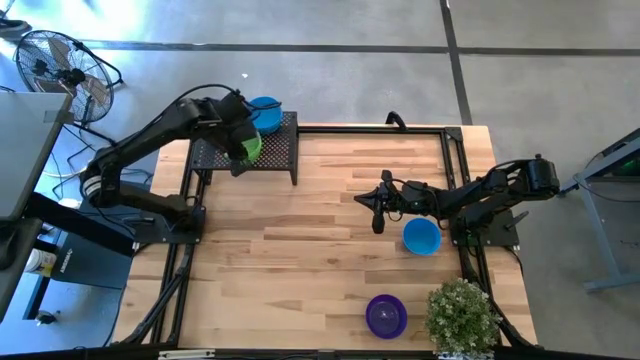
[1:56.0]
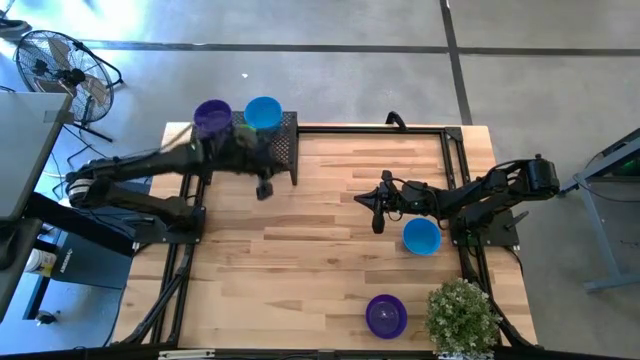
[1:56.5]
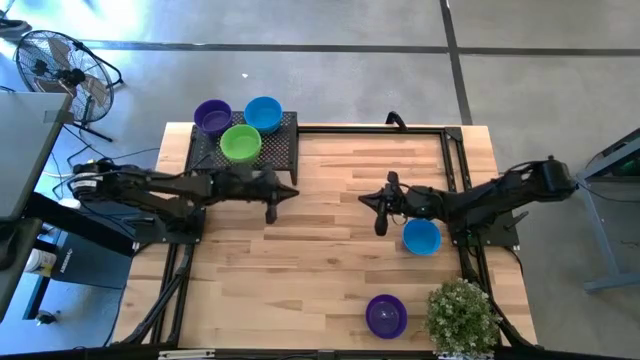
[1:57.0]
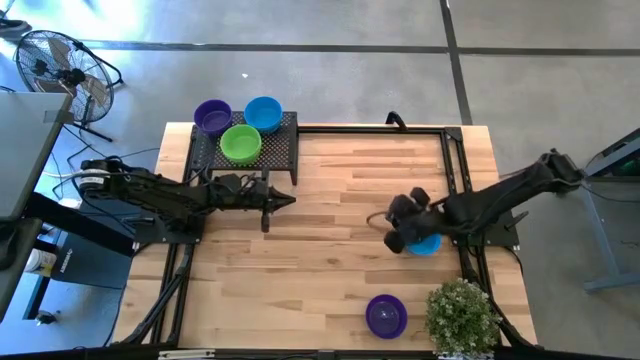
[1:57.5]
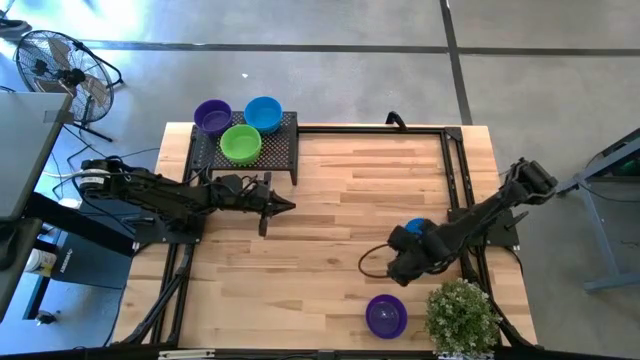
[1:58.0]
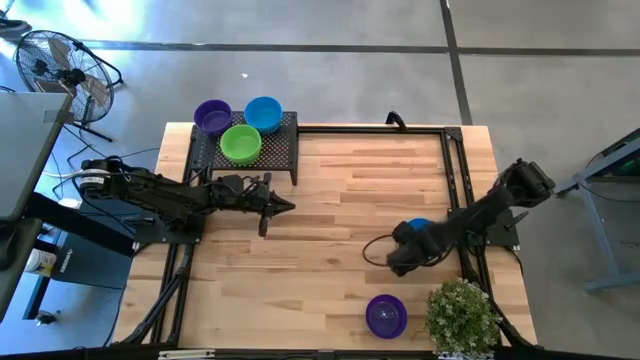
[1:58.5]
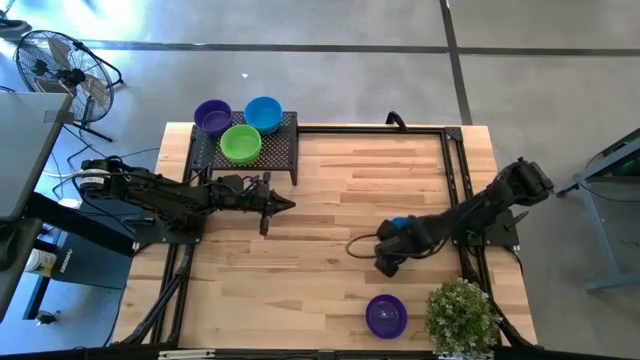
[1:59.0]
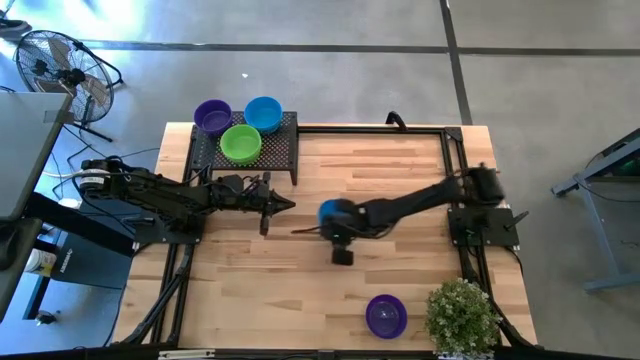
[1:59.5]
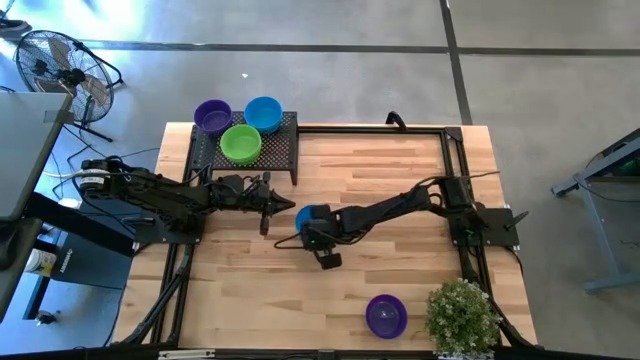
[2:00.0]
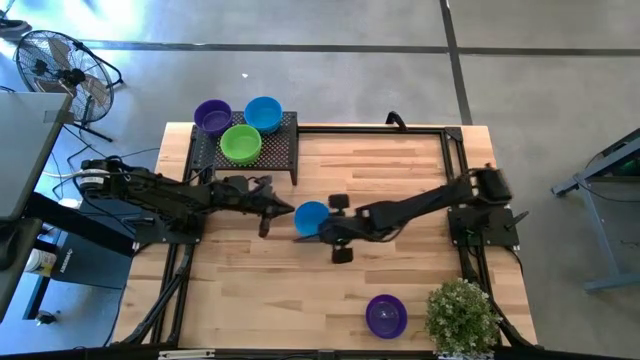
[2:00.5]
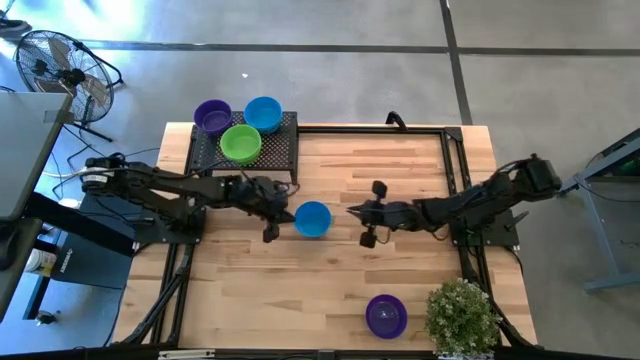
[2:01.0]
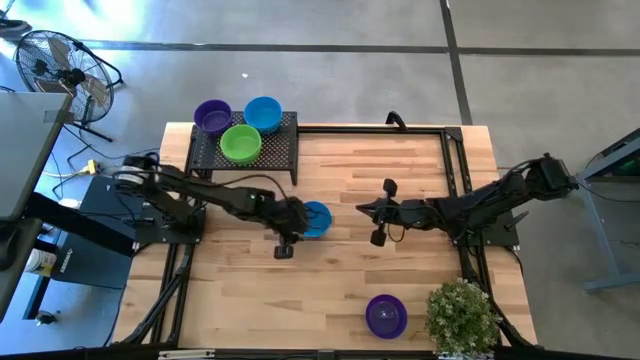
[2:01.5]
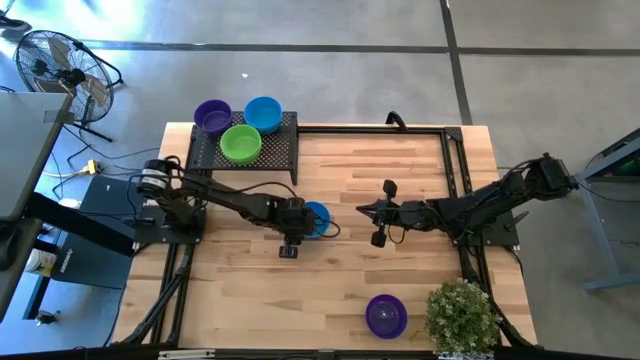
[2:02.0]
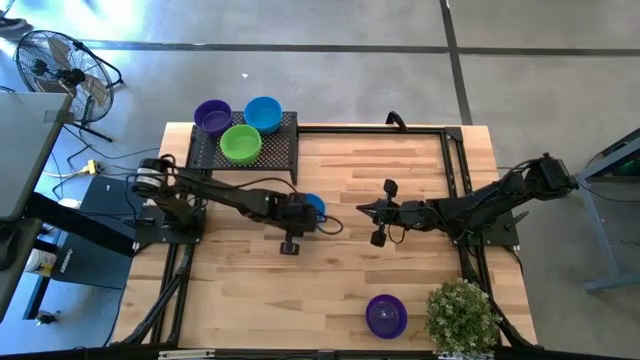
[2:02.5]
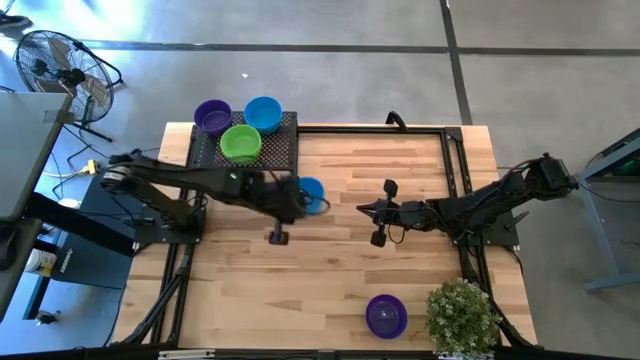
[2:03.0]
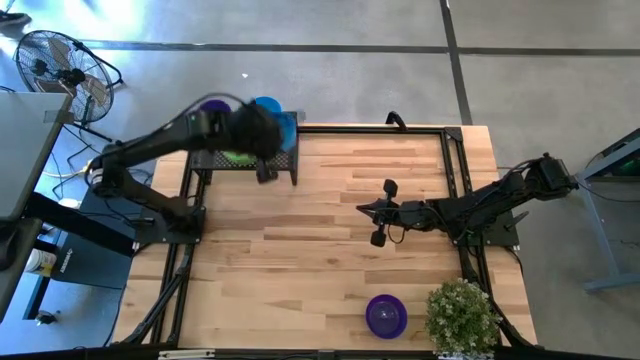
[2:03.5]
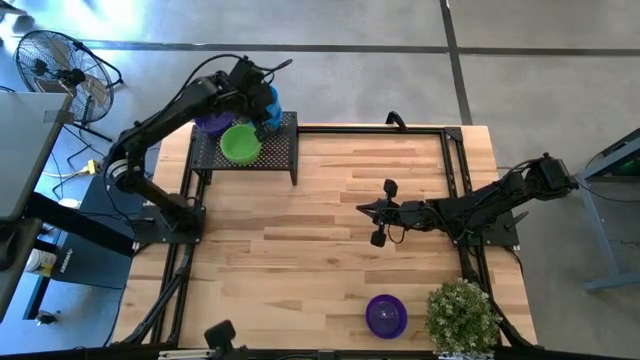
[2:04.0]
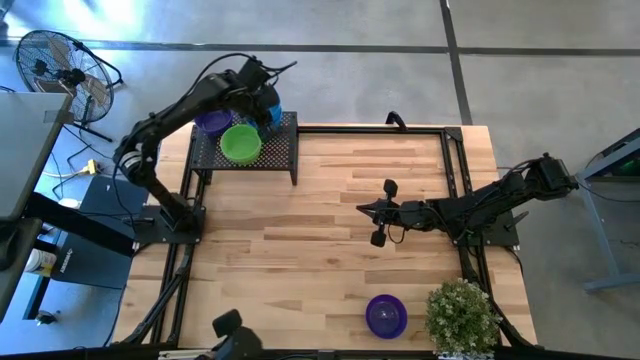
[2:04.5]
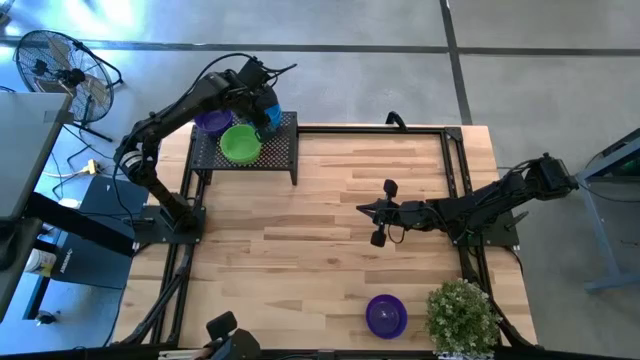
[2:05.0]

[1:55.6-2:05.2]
Task: Pick & Place Mini bowls
Stack the blue bowl on top of the blue bowl on the shelf

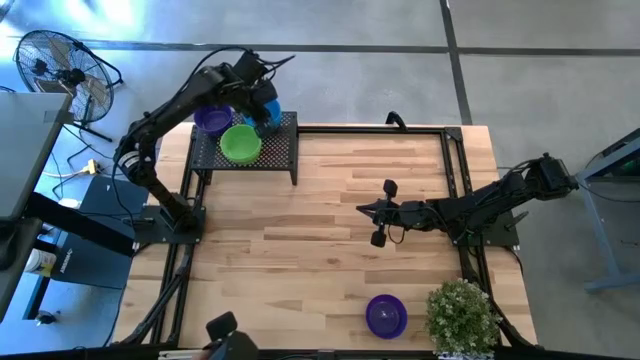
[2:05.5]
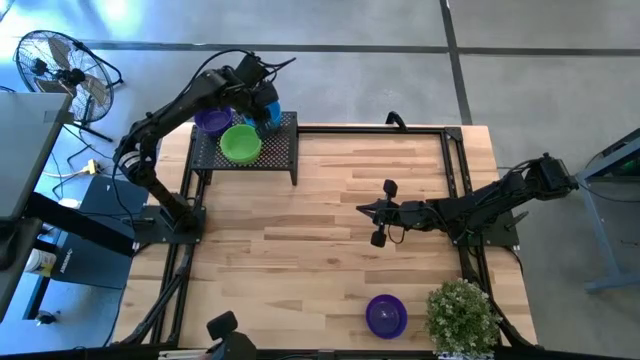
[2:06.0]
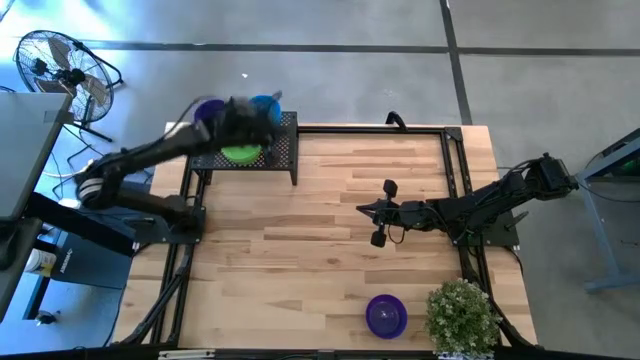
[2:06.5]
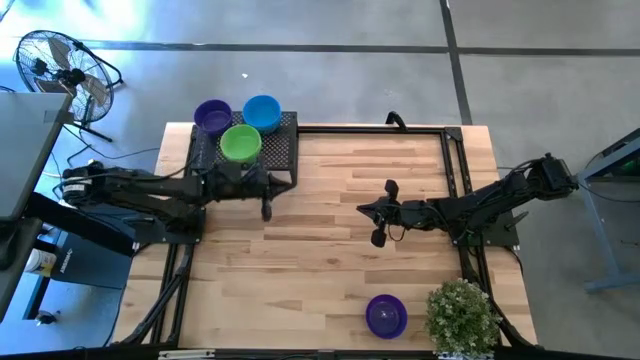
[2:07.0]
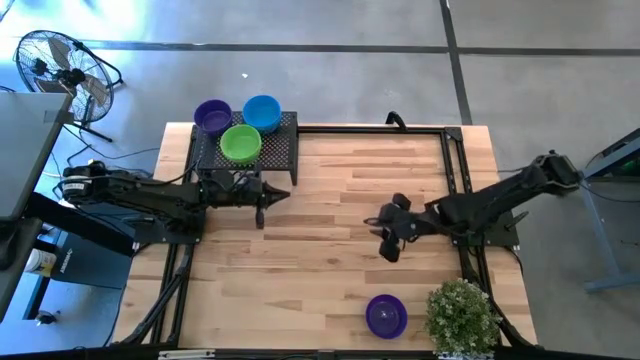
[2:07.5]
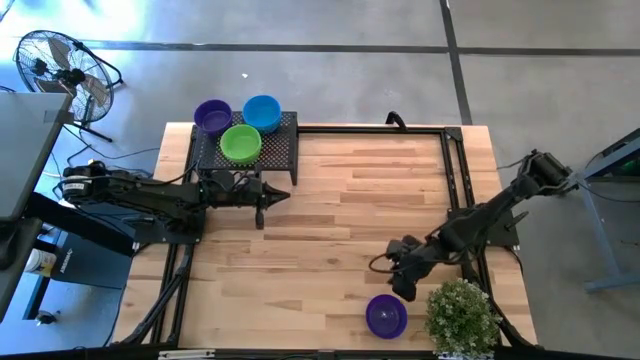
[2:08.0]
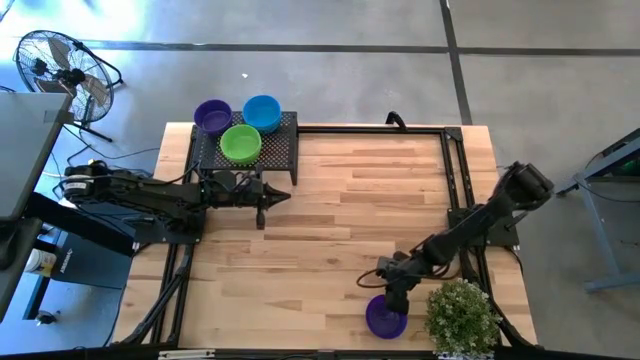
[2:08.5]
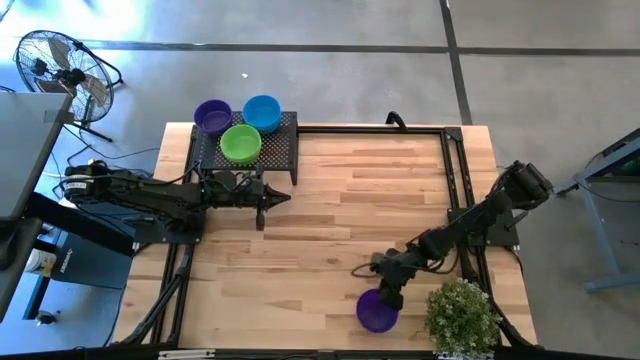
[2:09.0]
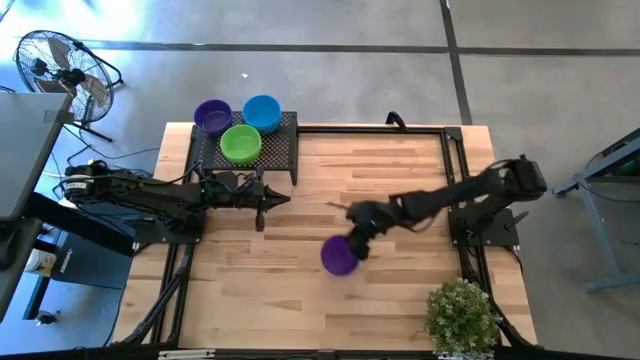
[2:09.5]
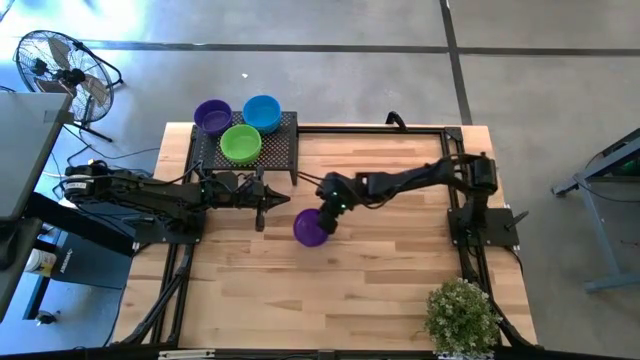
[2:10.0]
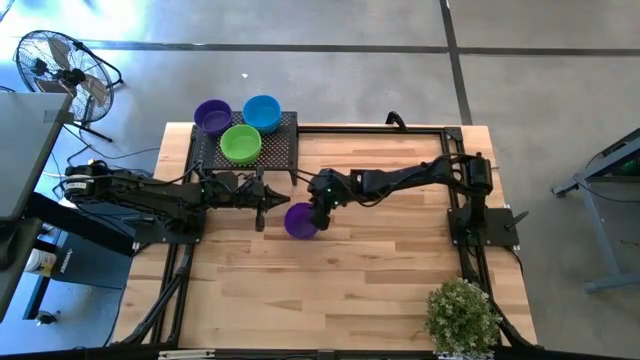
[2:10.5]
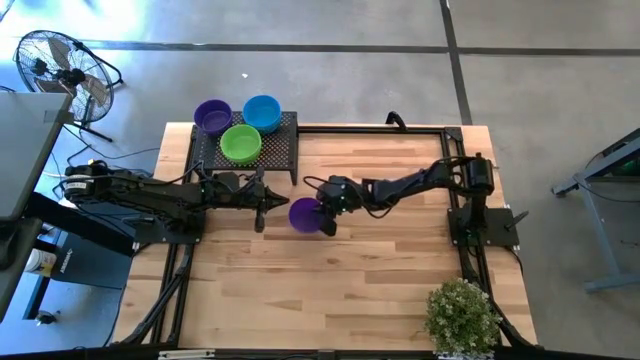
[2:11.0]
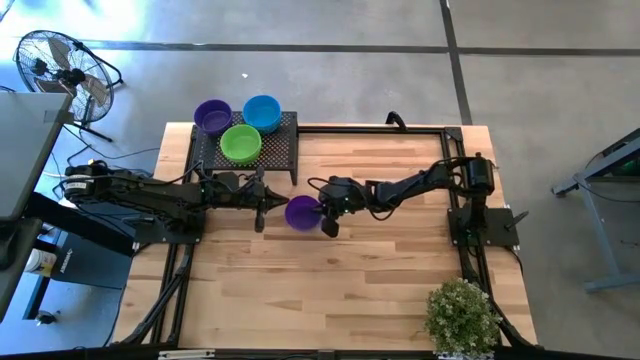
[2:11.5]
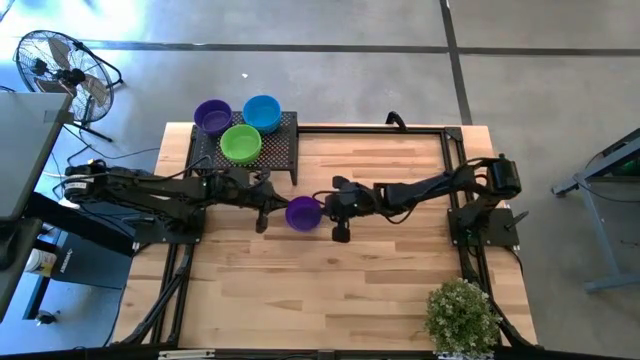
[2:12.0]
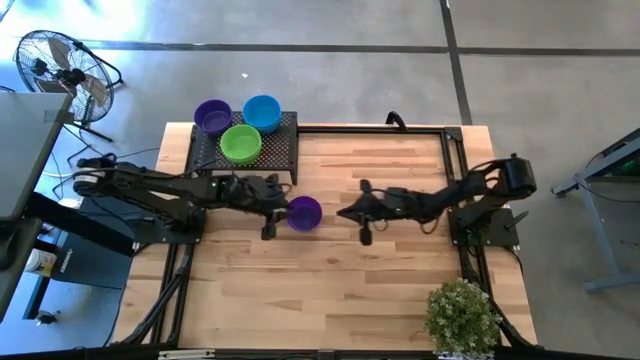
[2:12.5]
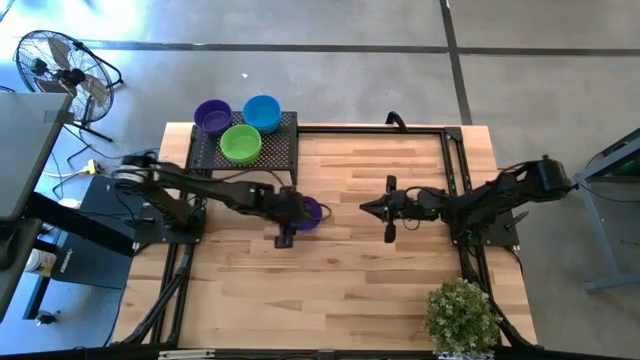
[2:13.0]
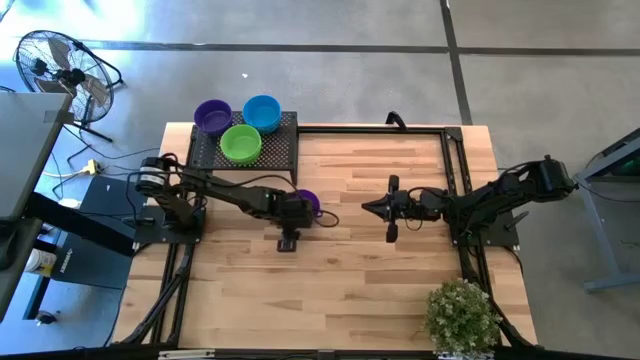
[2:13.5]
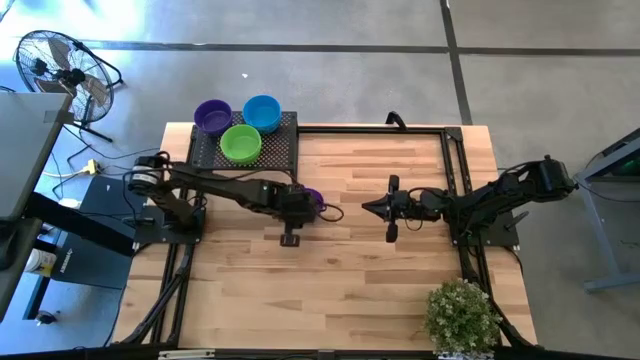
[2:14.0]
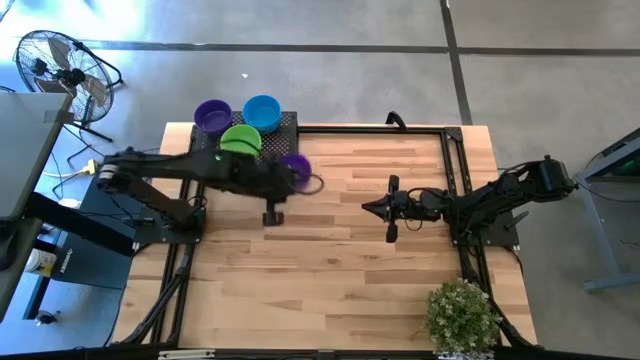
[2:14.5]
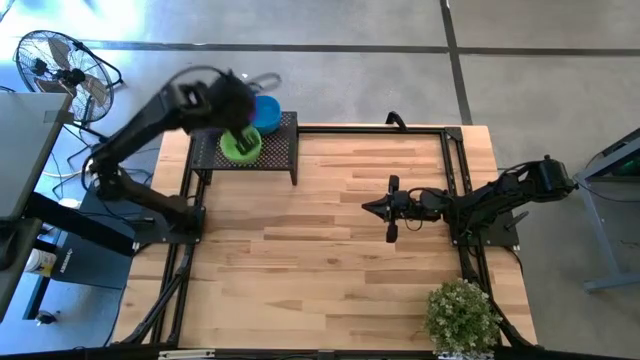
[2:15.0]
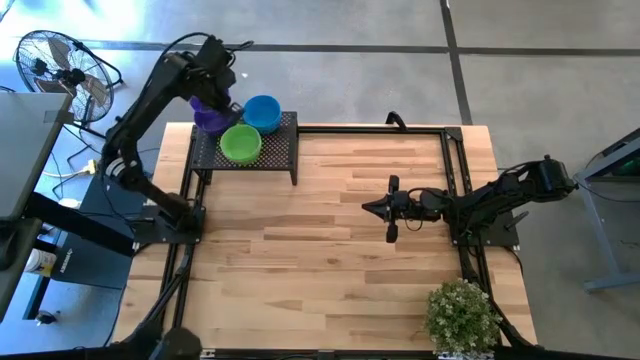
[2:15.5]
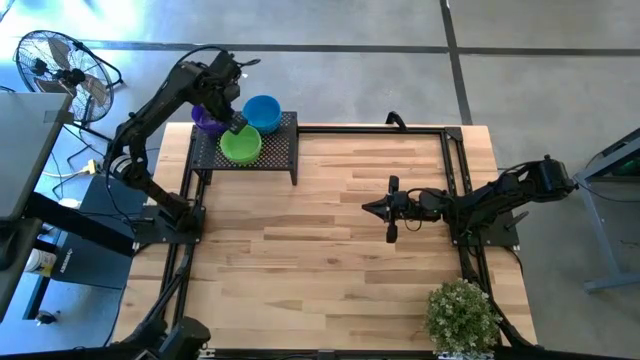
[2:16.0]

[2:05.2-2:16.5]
Stack the purple bowl on top of the purple bowl on the shelf

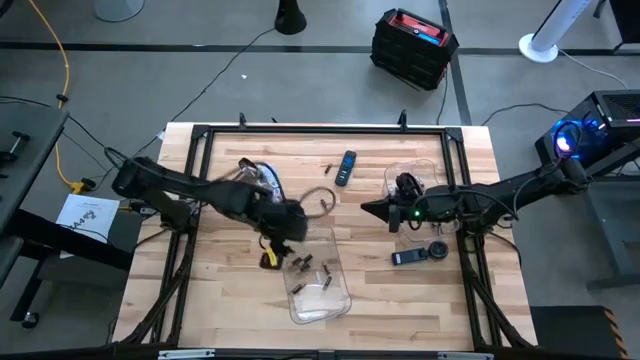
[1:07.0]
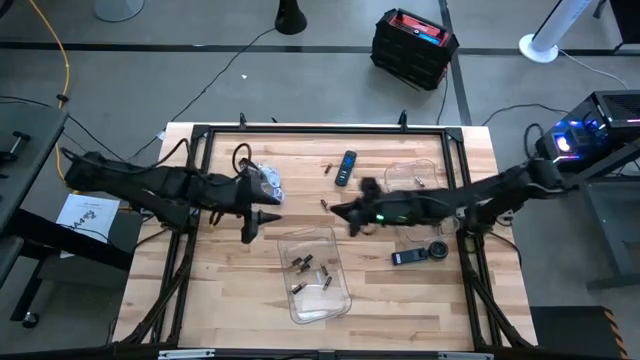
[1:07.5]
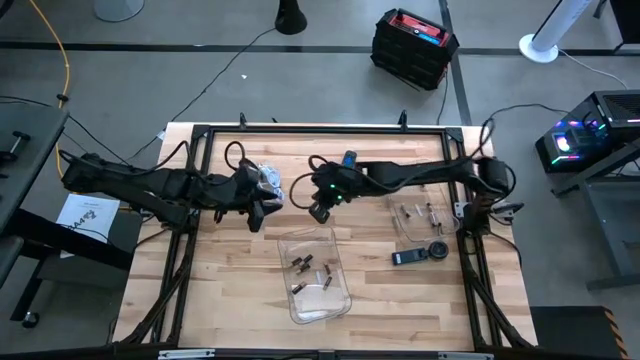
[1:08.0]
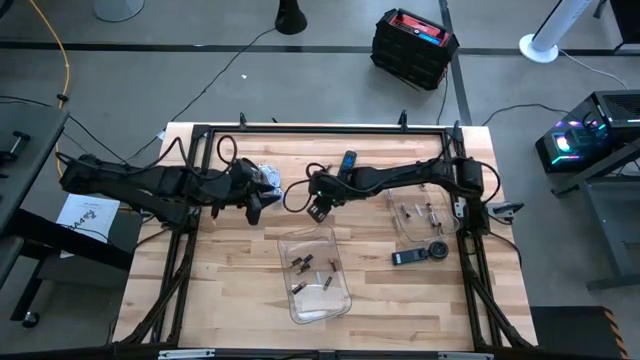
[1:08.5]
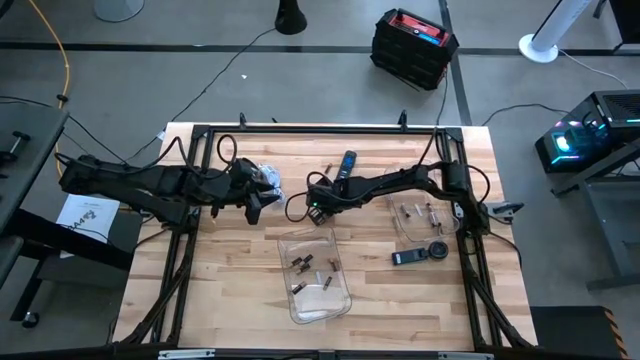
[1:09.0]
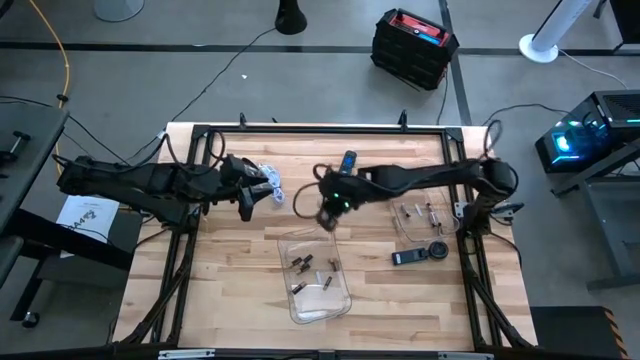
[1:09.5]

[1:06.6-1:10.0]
Task: Sort batteries
Put the black battery into the left transparent bin
